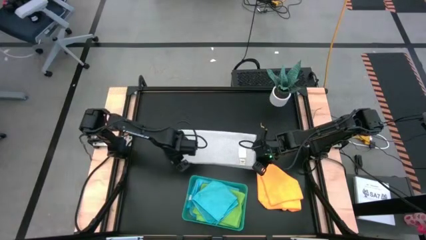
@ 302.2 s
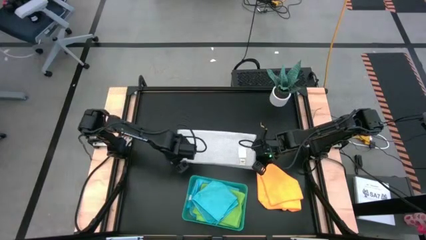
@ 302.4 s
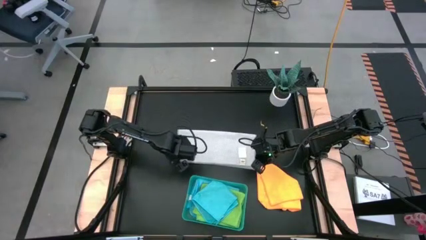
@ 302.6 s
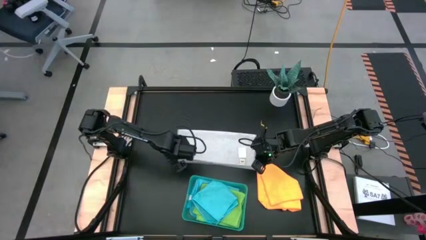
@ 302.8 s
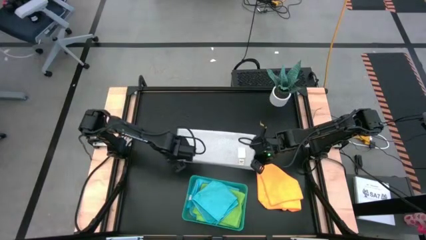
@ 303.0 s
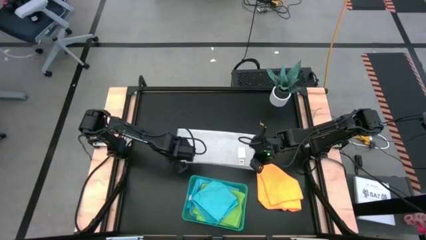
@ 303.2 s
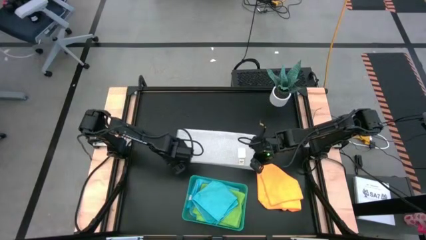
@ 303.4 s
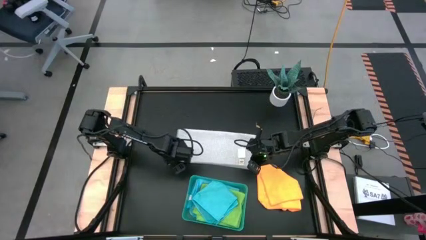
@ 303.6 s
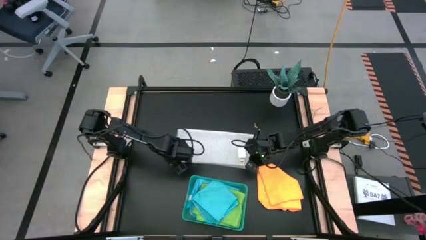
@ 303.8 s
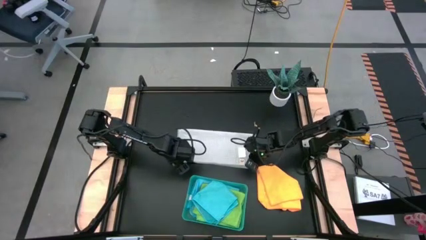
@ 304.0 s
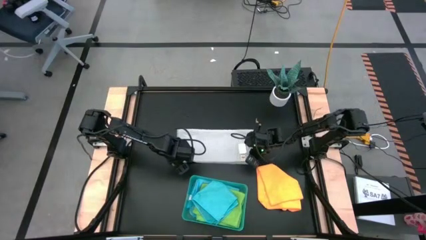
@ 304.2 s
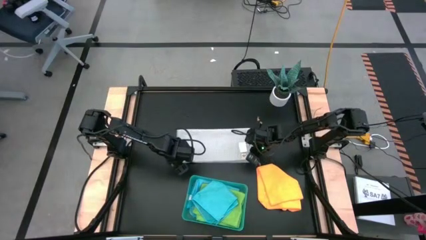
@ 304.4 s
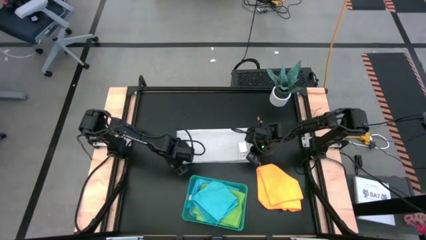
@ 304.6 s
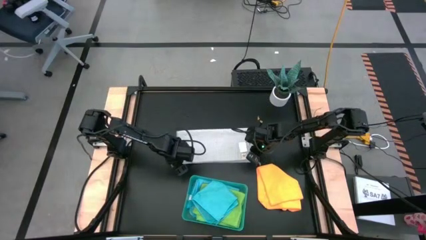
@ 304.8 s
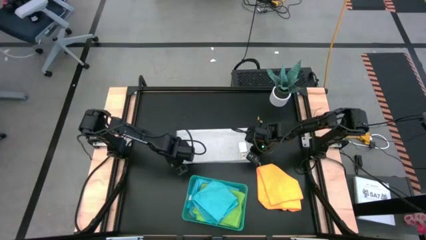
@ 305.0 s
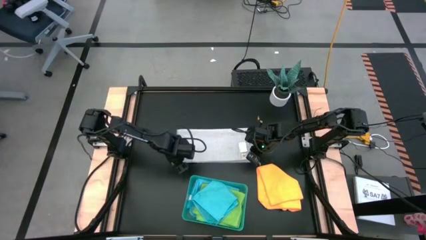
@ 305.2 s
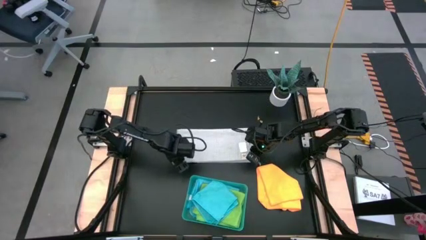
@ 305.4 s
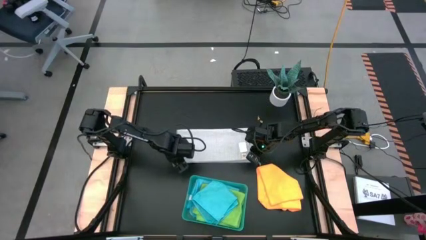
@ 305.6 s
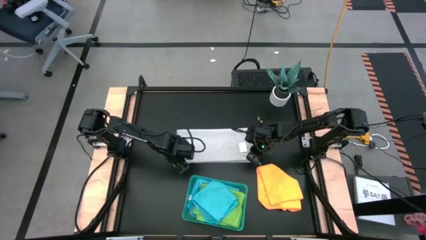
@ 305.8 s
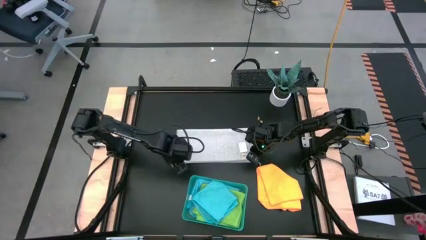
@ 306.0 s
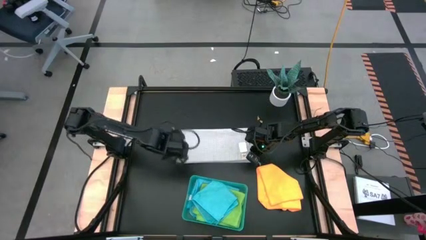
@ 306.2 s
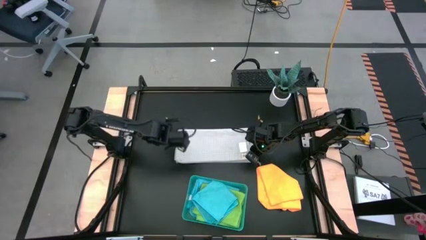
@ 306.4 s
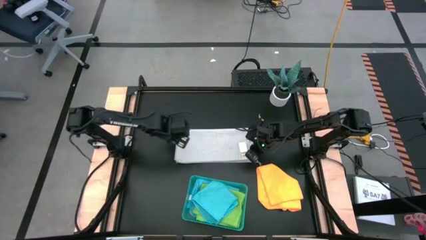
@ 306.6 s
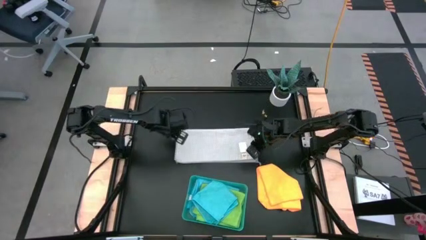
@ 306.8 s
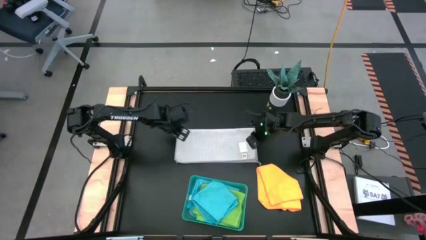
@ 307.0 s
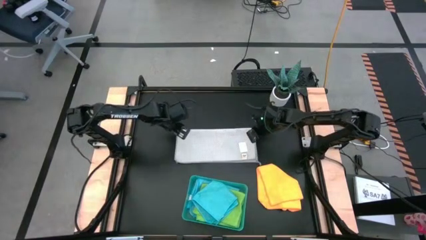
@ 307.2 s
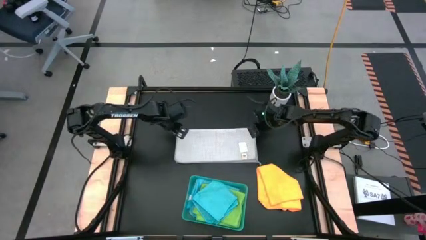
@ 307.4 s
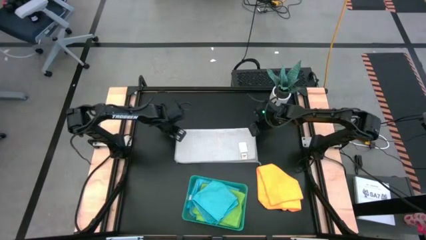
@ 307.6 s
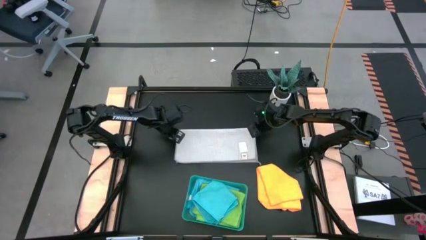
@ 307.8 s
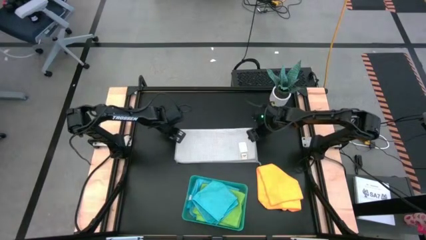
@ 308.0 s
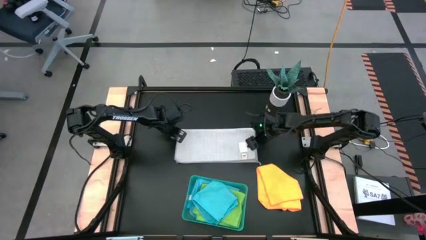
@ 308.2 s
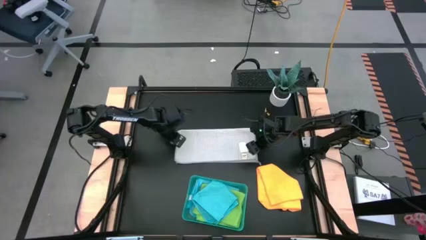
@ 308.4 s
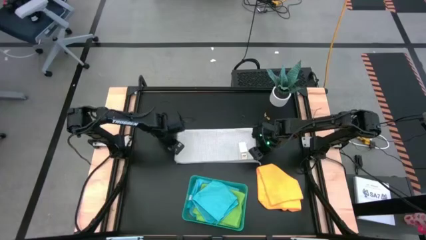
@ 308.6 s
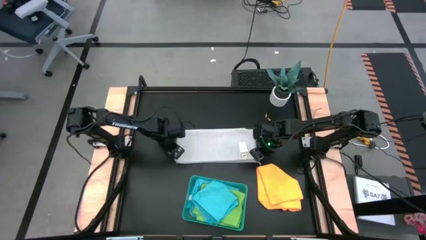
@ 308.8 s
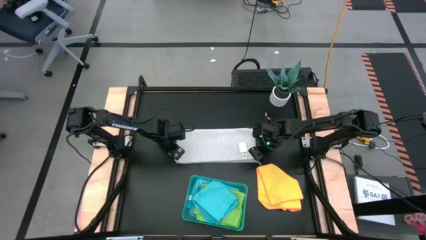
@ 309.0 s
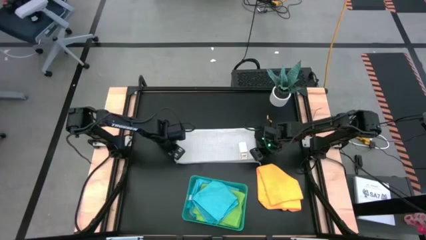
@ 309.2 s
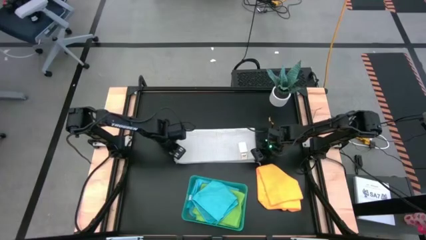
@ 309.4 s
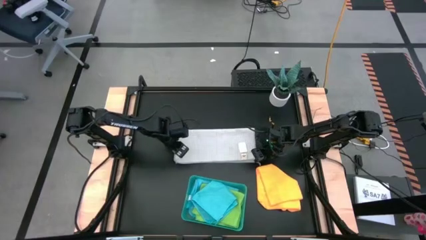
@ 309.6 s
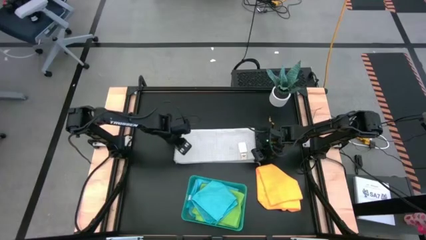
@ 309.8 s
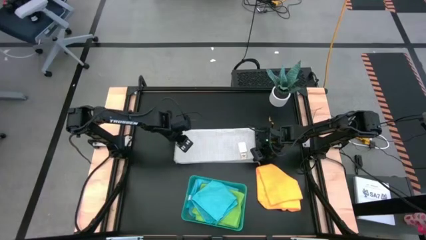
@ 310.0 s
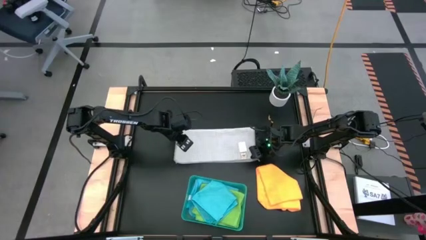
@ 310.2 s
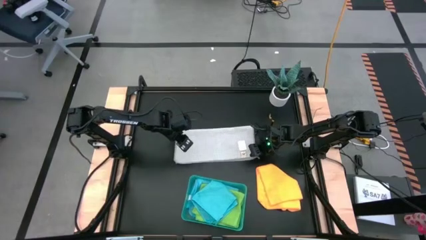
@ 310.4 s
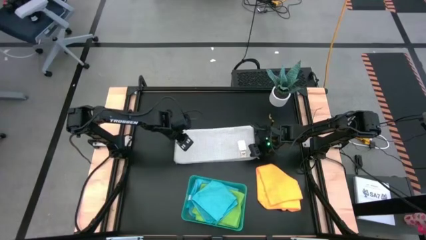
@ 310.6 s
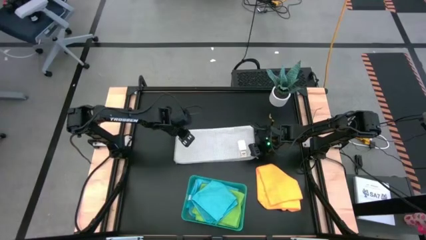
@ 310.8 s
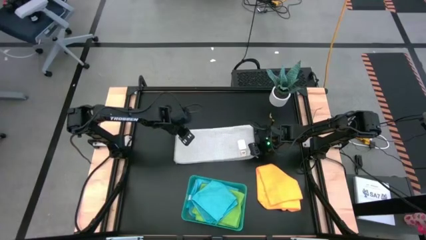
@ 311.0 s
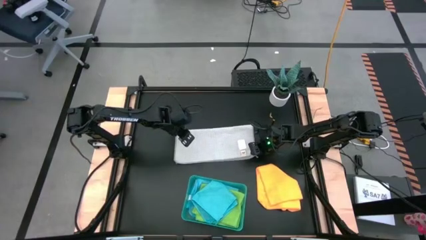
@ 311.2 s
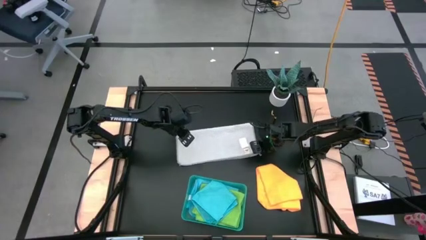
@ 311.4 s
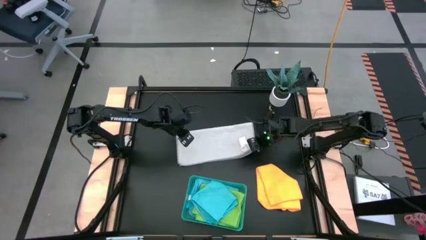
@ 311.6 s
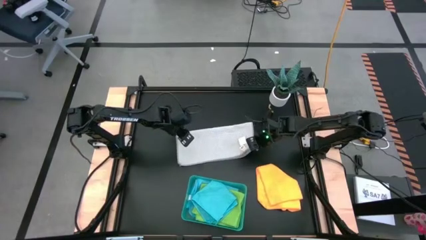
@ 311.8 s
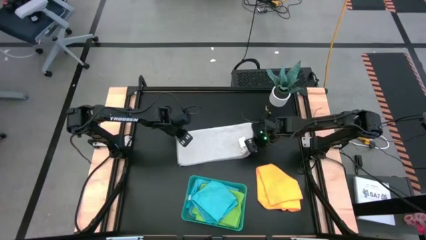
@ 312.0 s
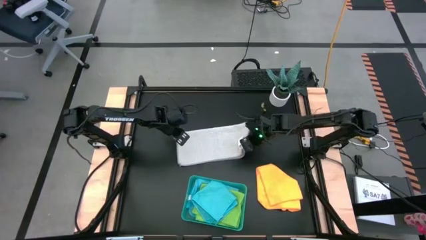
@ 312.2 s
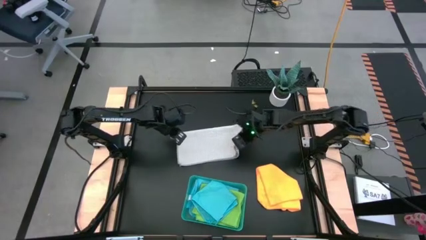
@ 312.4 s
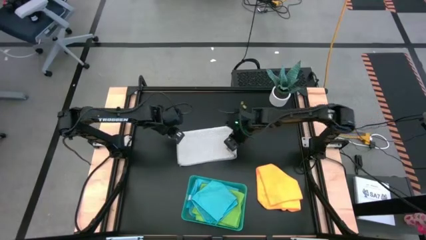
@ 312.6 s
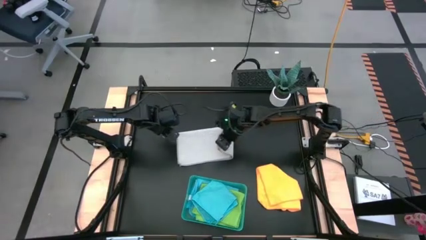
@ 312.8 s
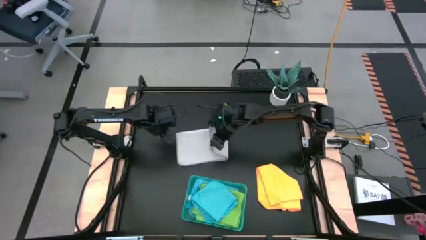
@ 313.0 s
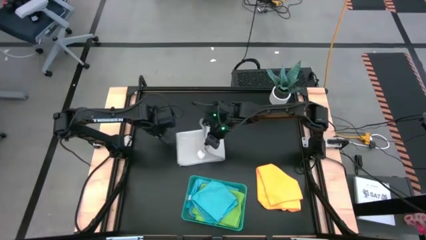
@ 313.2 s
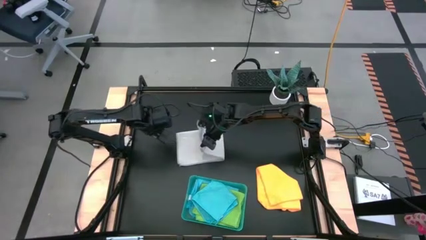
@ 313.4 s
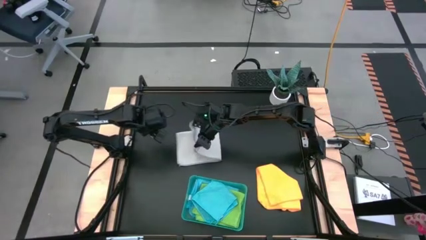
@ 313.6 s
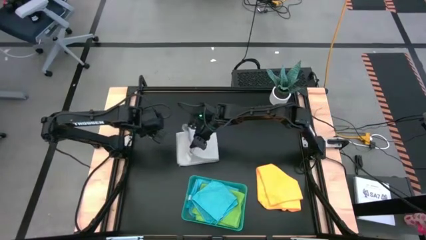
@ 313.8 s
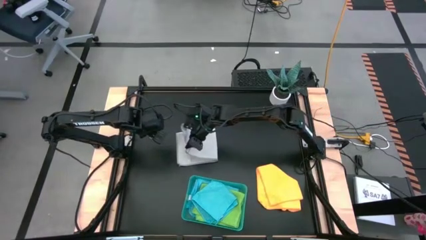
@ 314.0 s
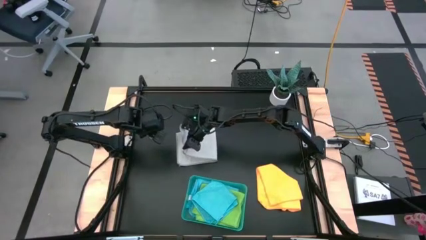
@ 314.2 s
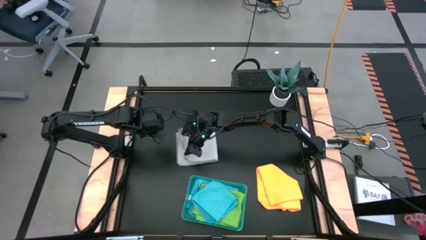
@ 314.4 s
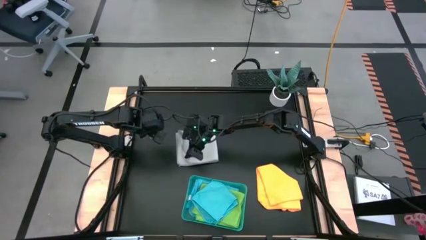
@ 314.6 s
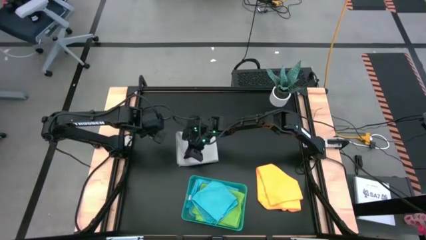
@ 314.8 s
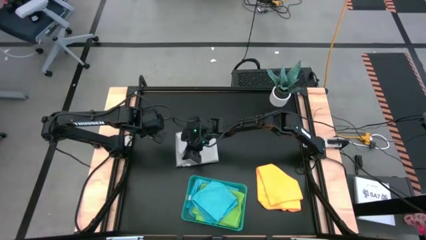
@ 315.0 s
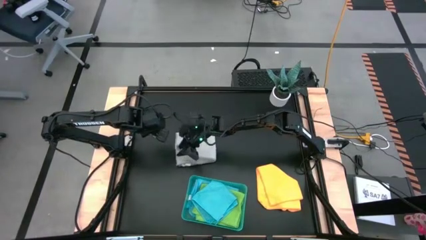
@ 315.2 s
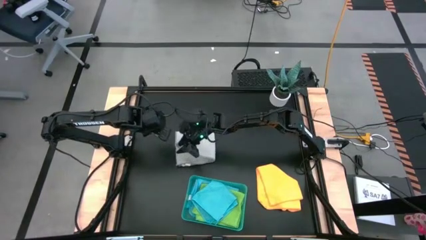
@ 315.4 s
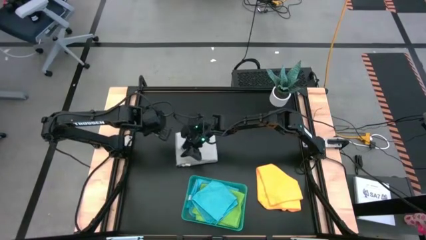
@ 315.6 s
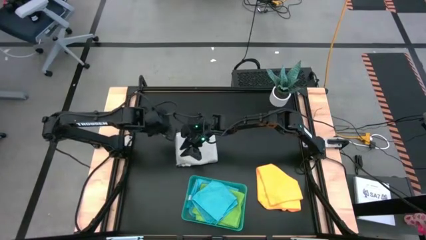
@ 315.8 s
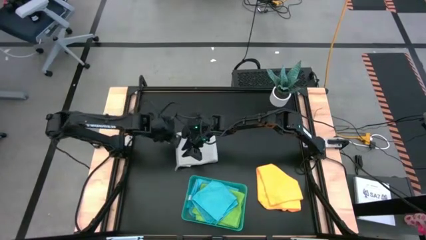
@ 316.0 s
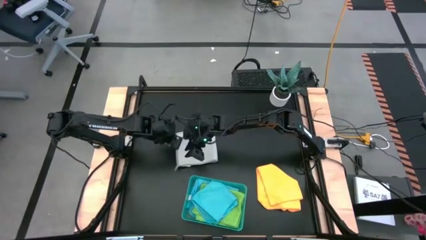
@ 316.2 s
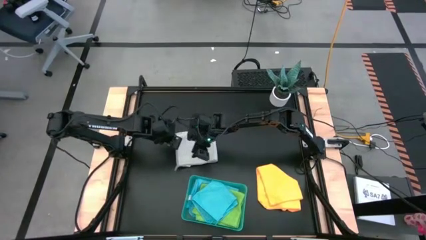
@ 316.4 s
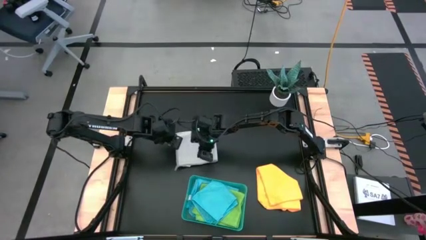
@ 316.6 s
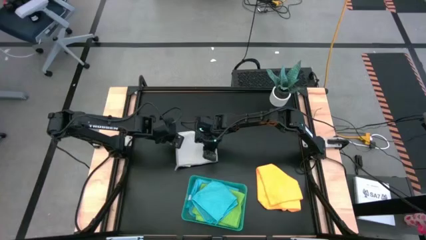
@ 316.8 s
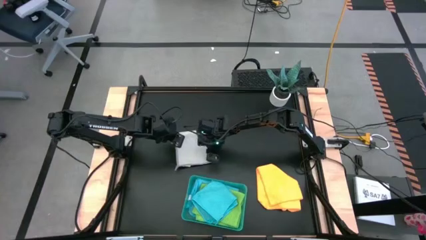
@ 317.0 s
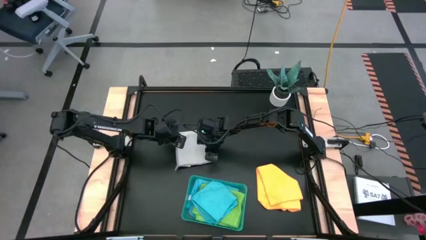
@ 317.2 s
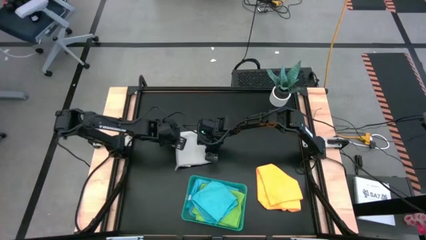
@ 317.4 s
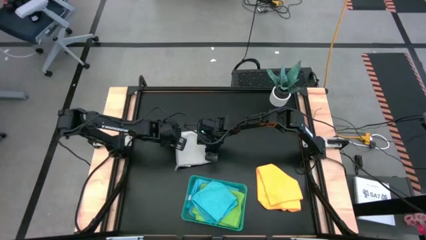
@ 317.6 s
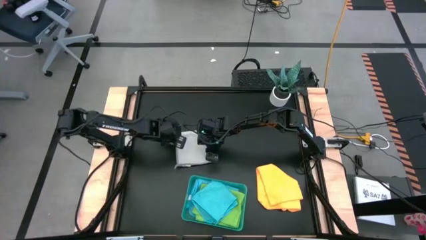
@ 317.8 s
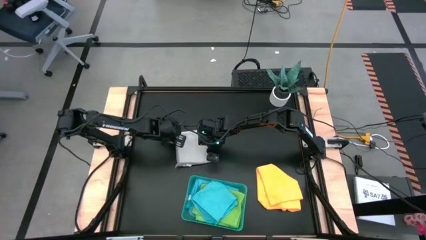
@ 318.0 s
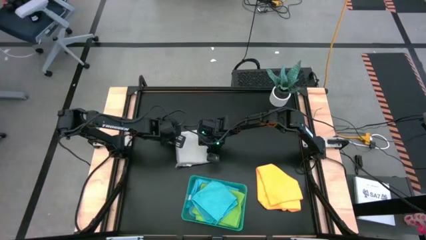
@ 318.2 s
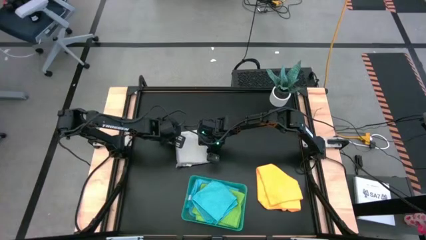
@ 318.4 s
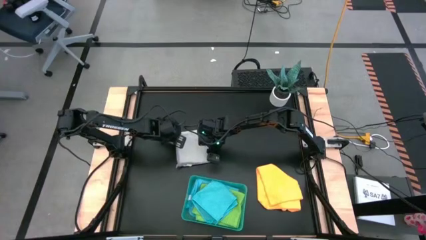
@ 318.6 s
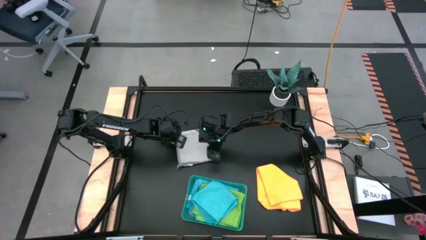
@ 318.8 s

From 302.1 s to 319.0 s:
Task: Fold microfiber towels
Fold the gray microfiber cloth
